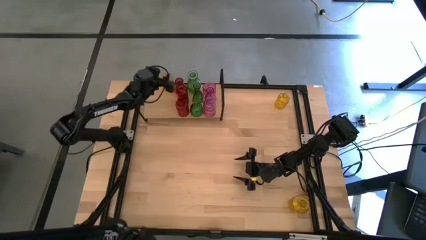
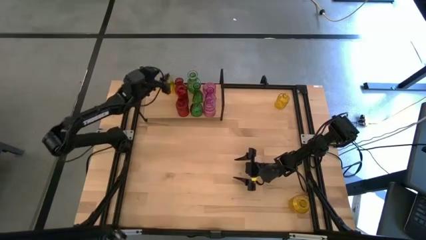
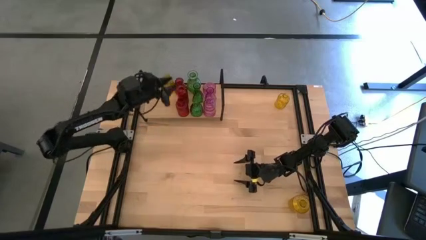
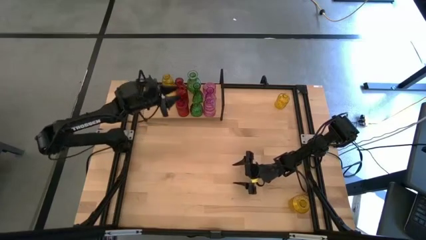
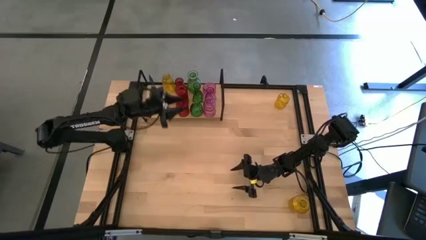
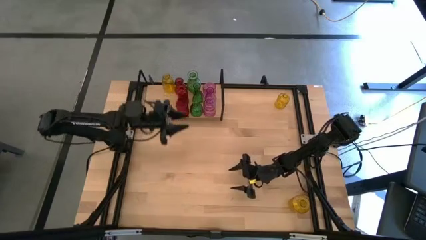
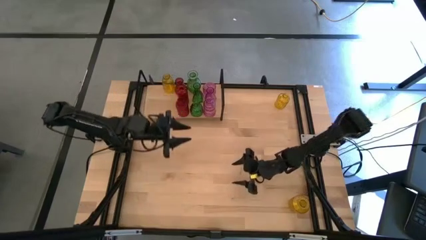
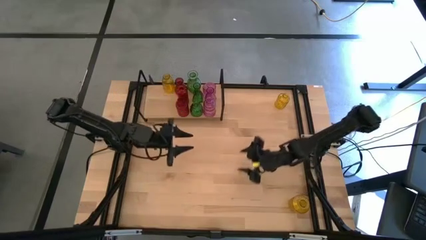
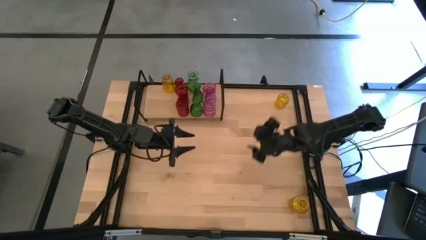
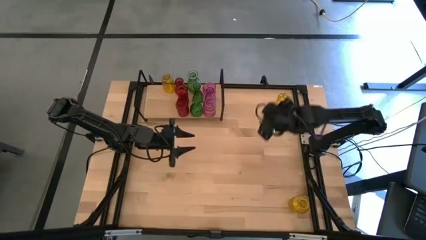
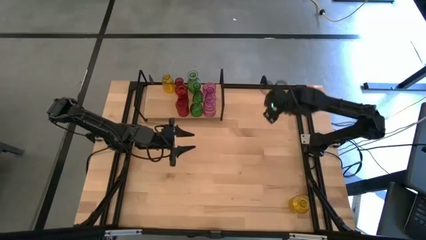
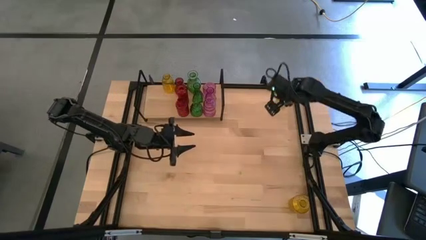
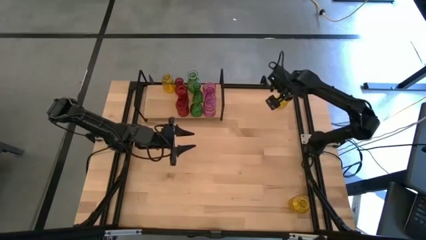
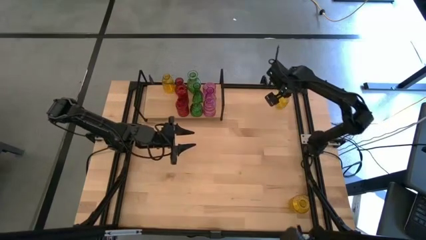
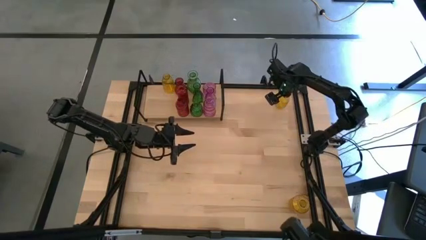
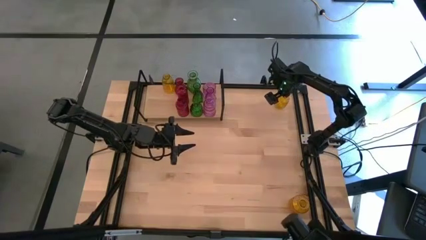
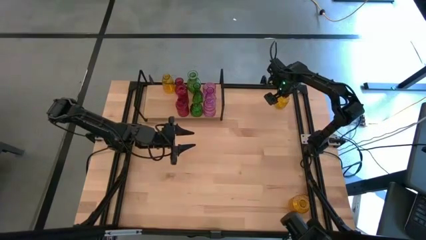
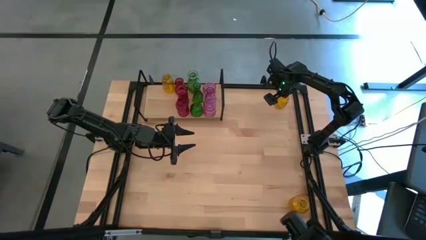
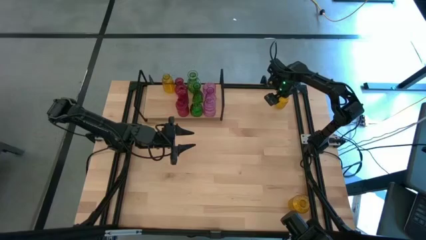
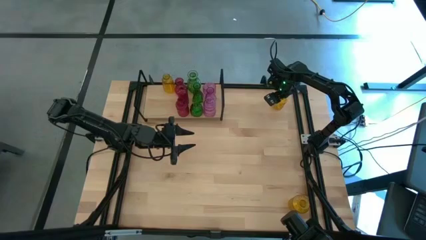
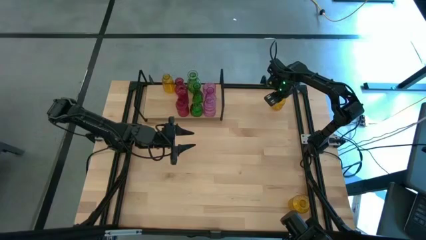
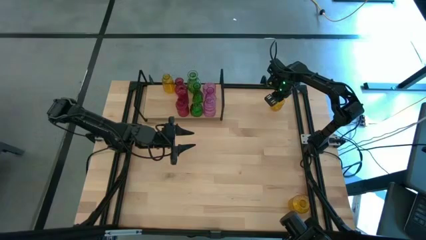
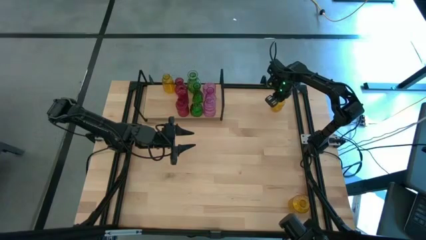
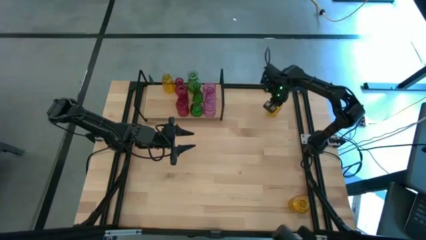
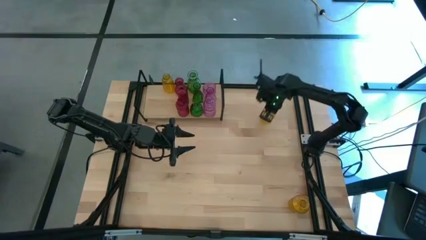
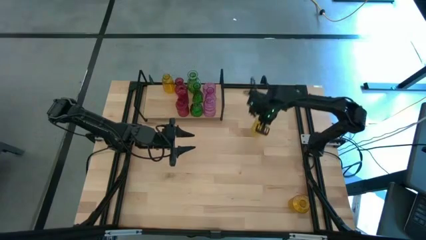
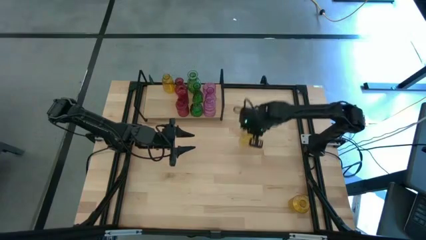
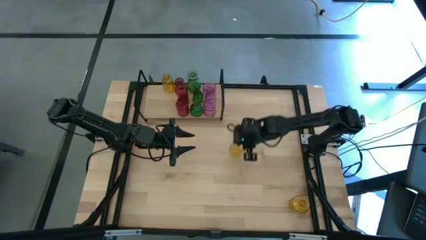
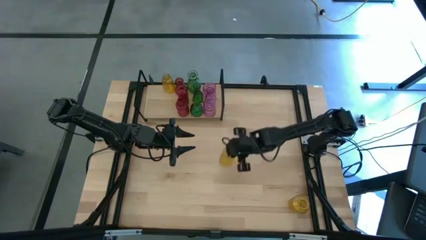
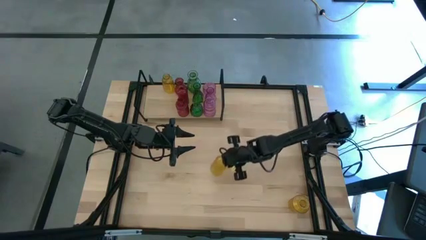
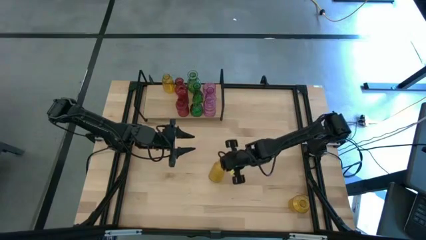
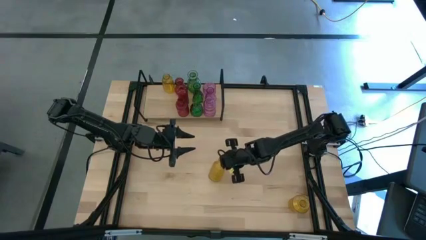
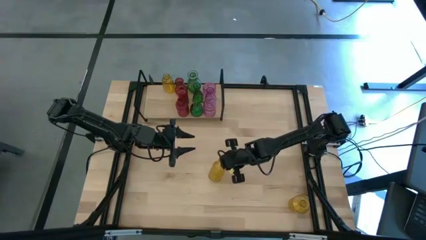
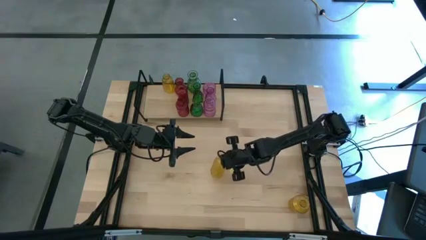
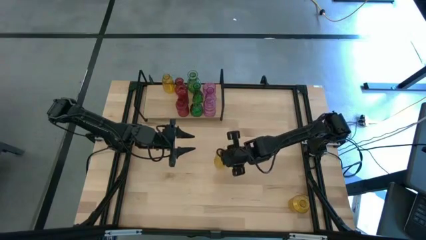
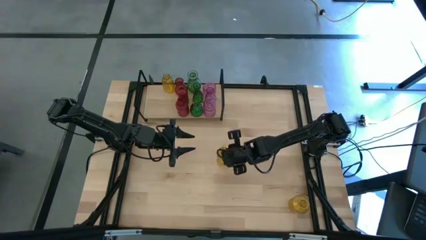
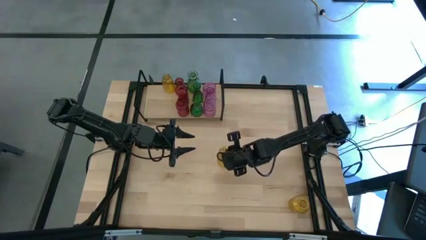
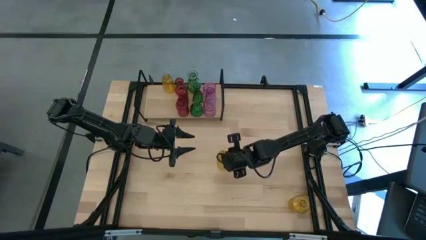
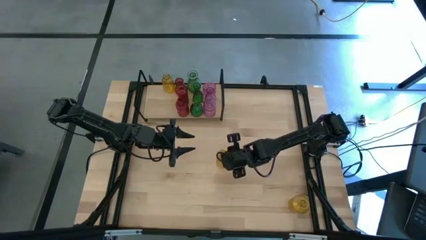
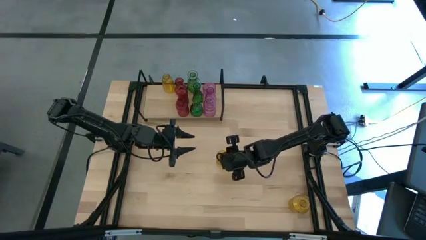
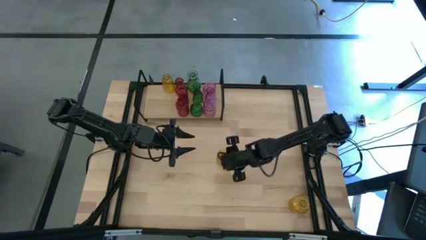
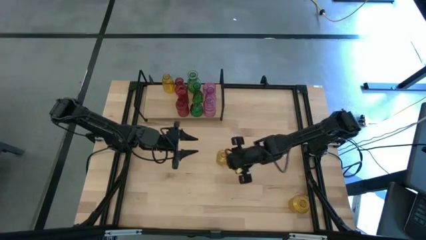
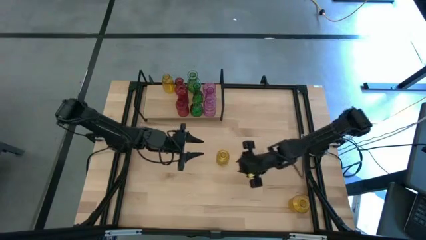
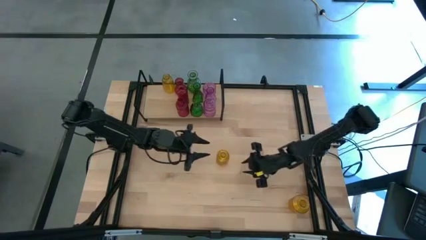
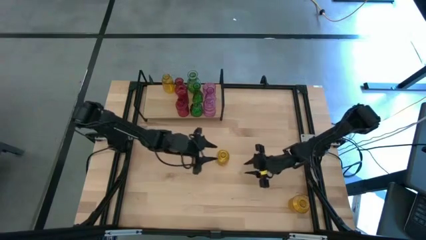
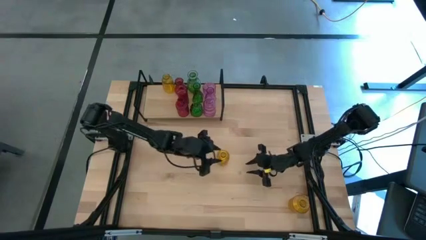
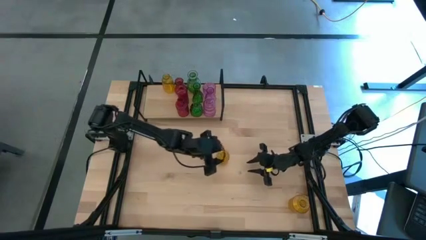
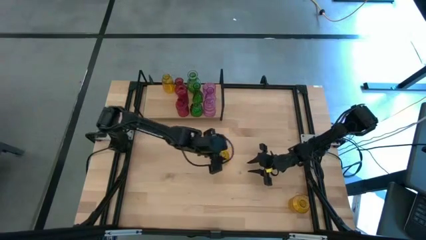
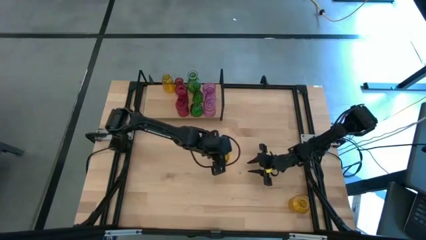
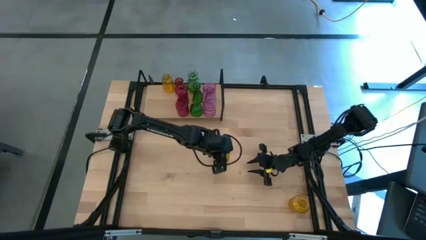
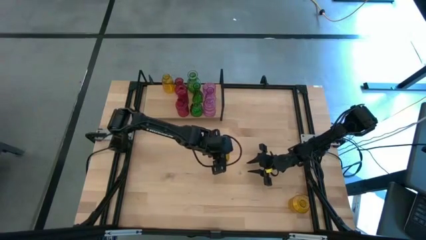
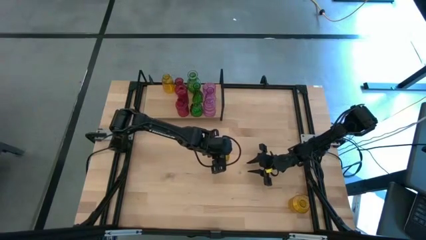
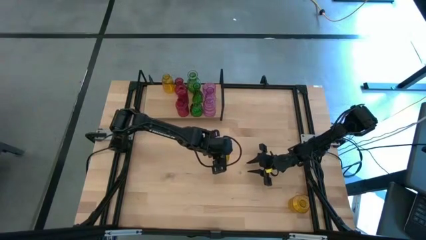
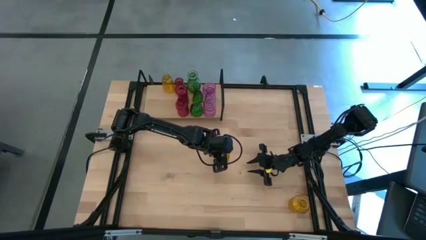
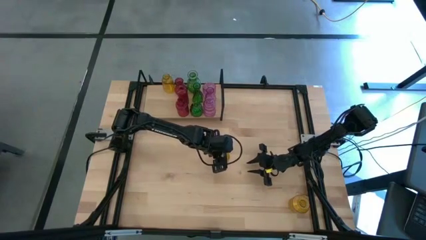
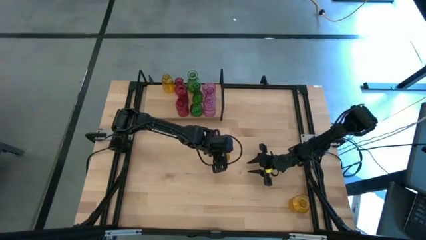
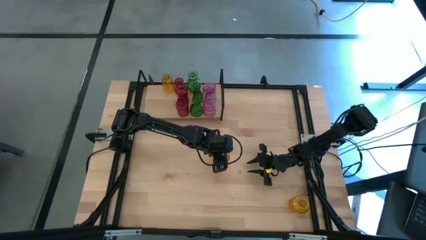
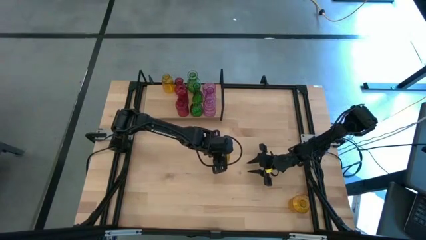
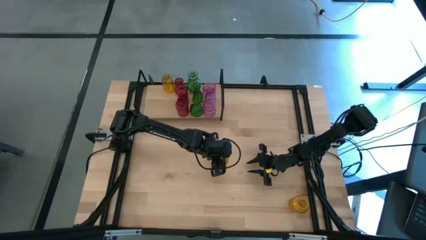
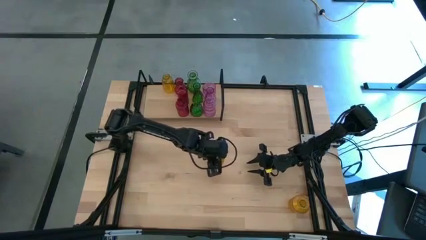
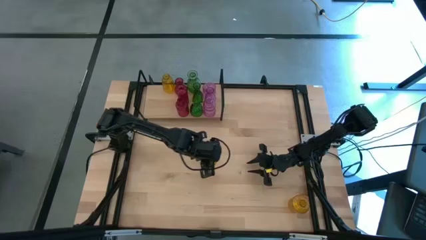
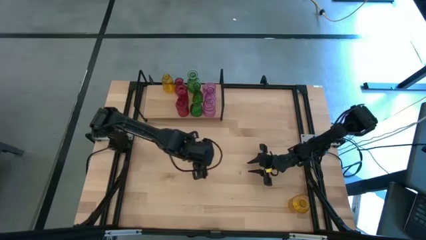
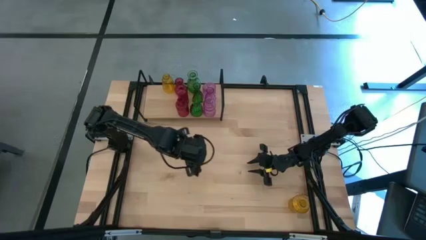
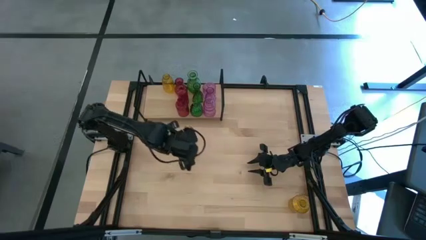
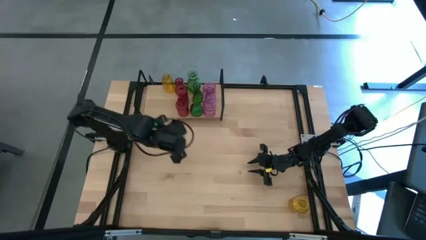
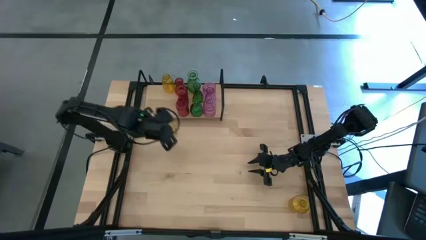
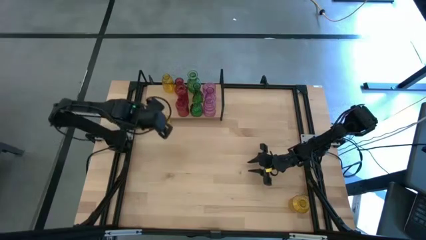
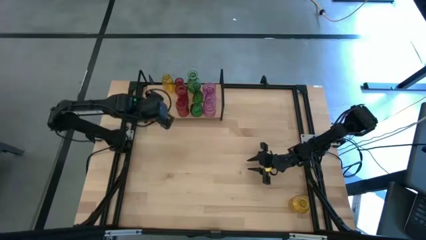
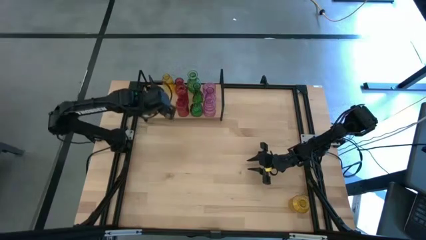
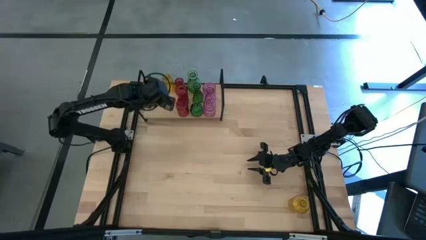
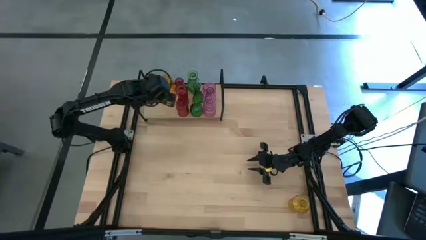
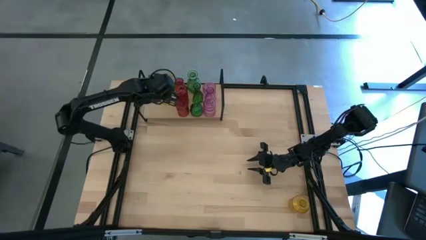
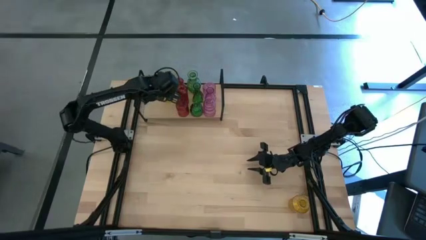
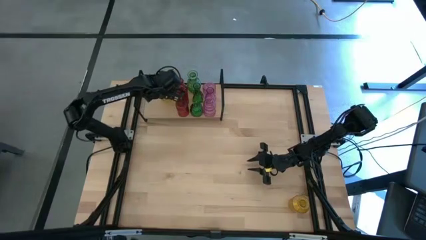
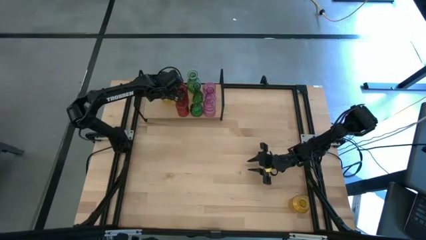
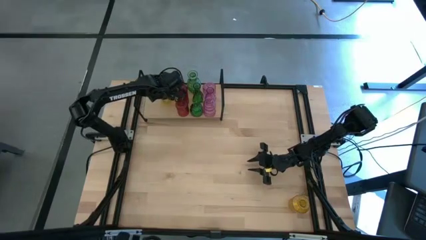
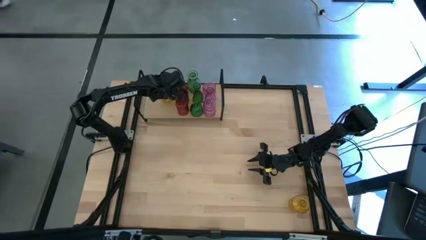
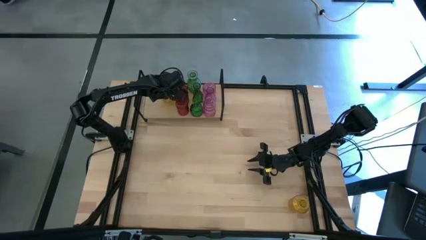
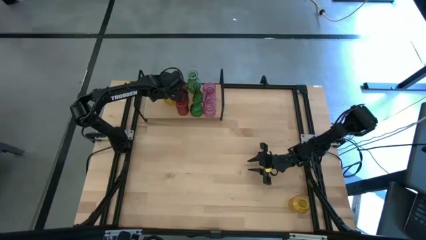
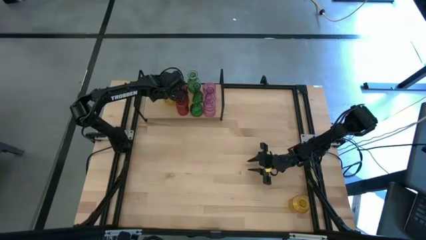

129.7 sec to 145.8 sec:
Task: sort vases onto shelf
Put the top yellow vase on the shelf aligned with the other yellow vase

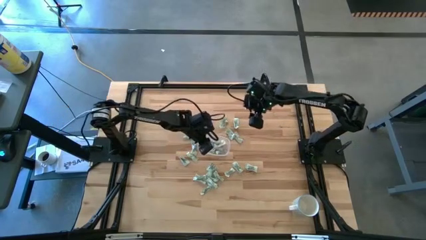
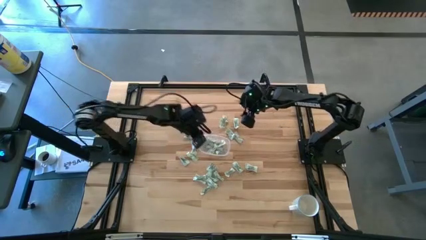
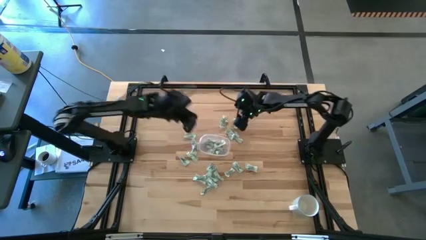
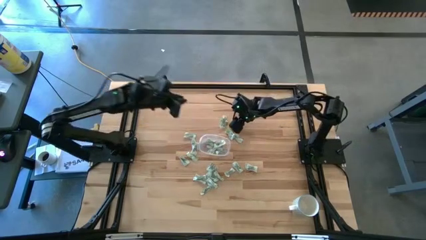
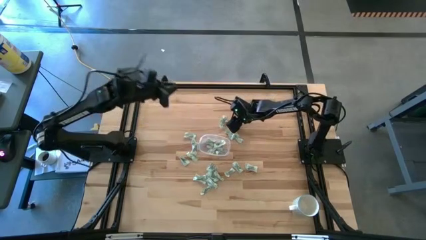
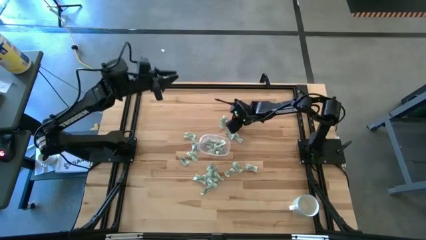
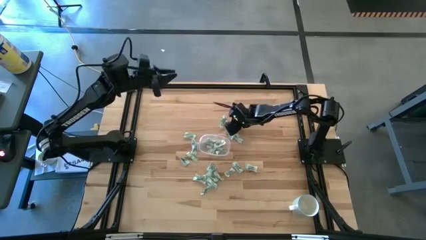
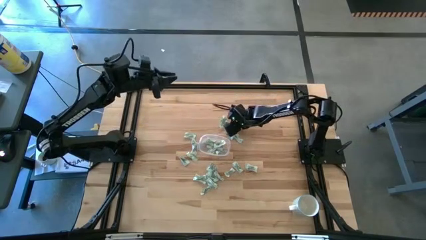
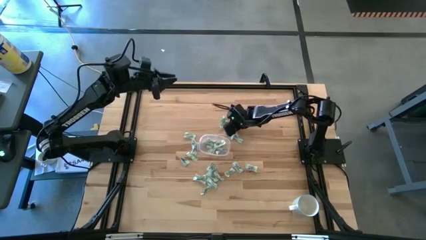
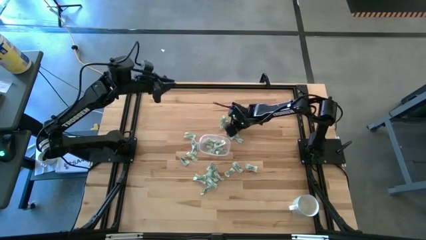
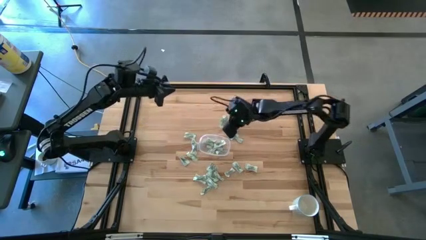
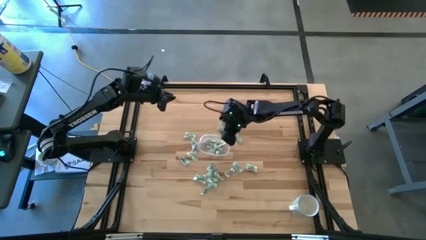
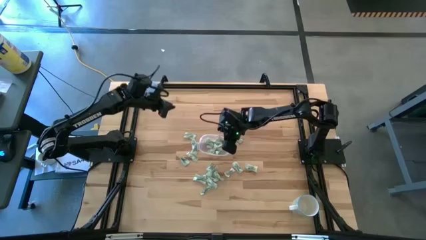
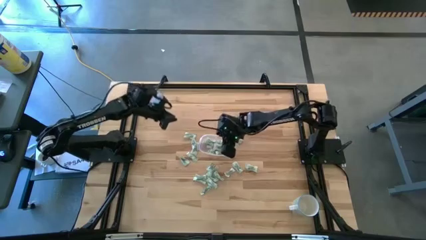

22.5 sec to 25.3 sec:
Task: Pick and place Stevia / Truvia into bins
Put the stevia packet into the transparent container
